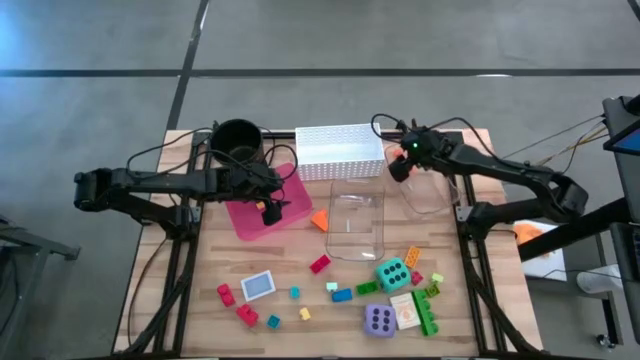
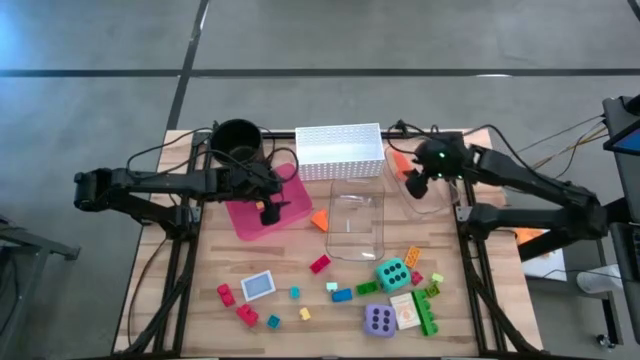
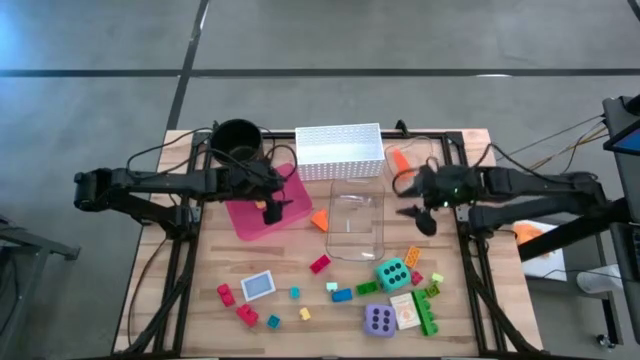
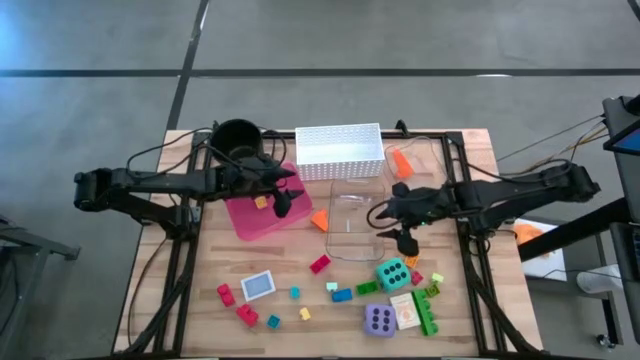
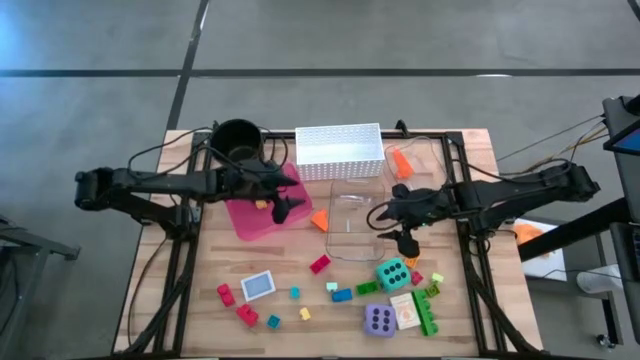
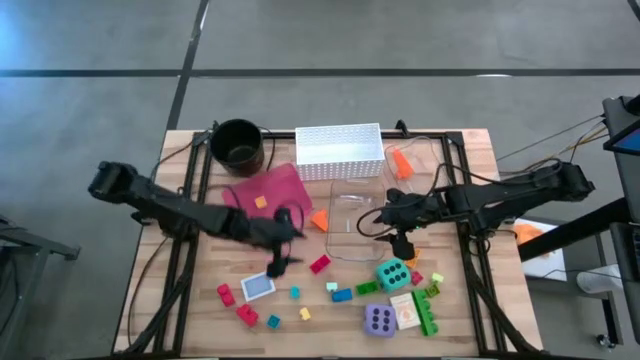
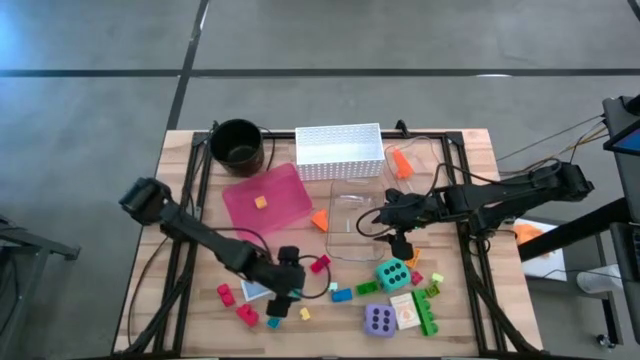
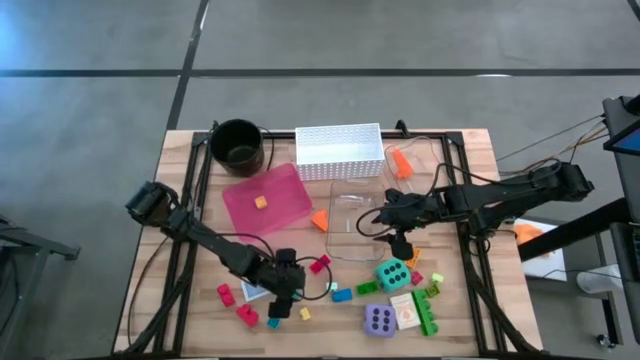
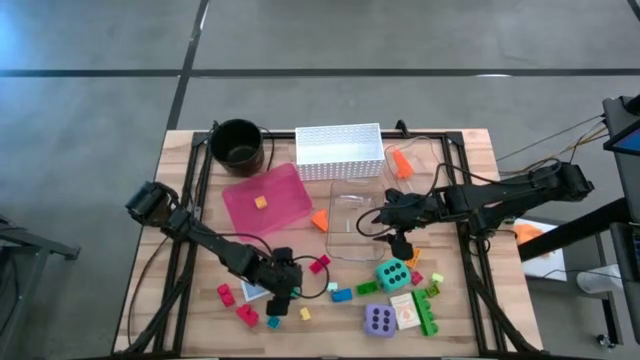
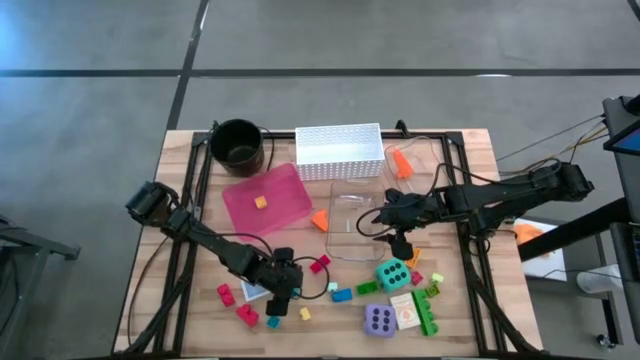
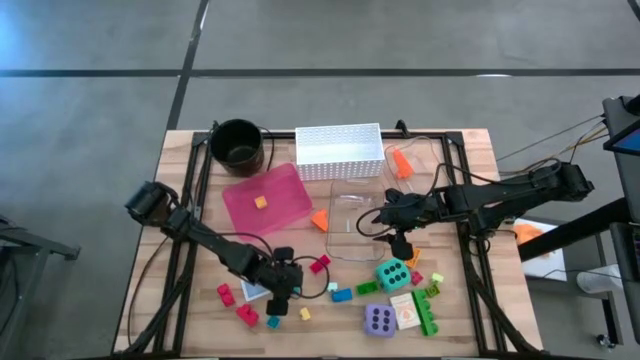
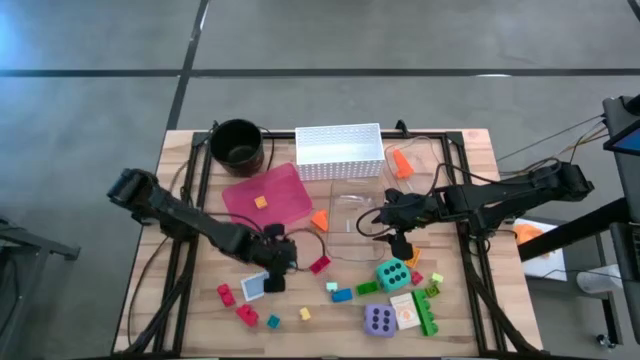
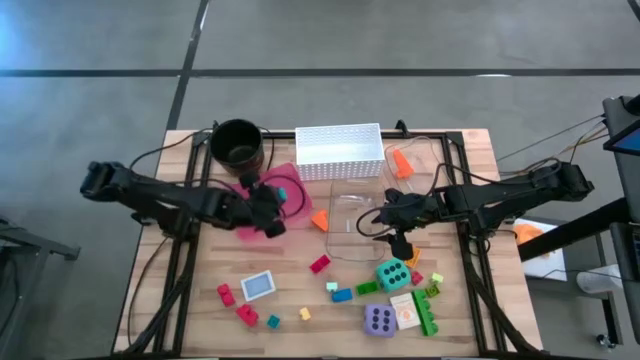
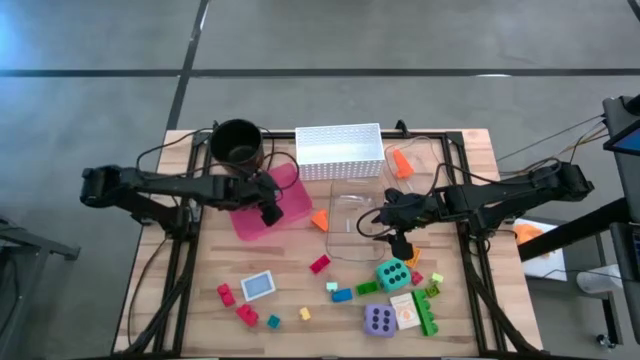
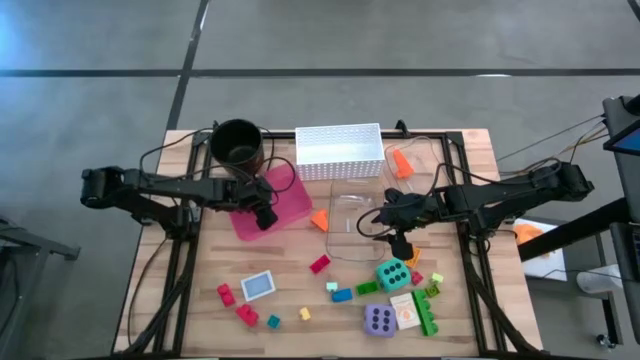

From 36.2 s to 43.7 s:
Task: Pick & Place Toys
Put the top small blue game piece into the red bin

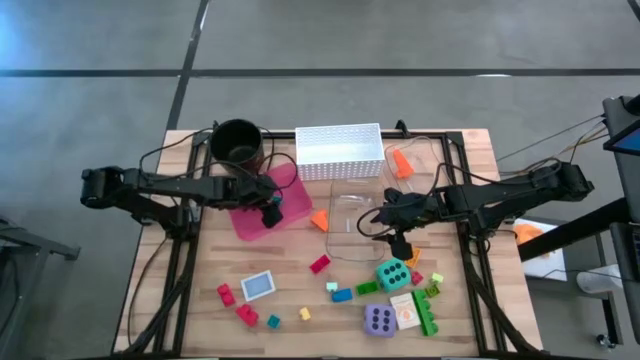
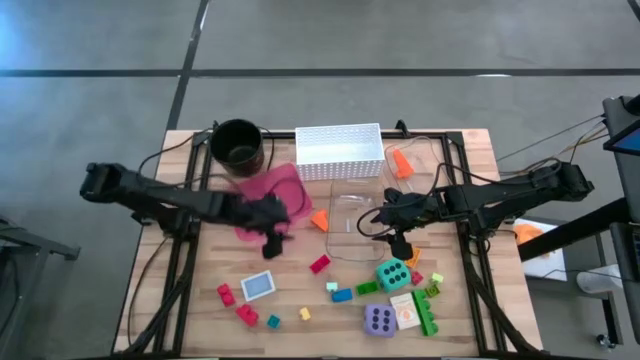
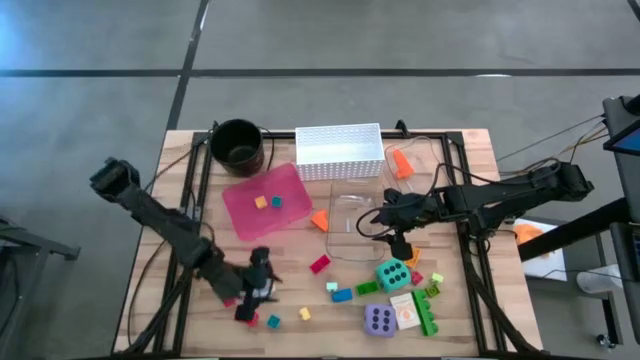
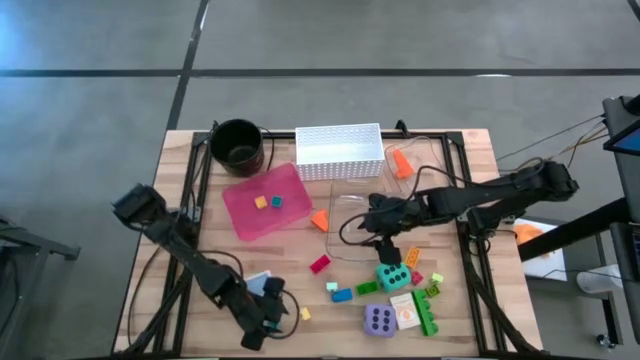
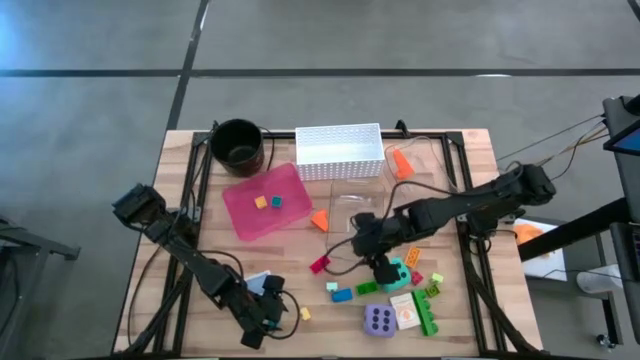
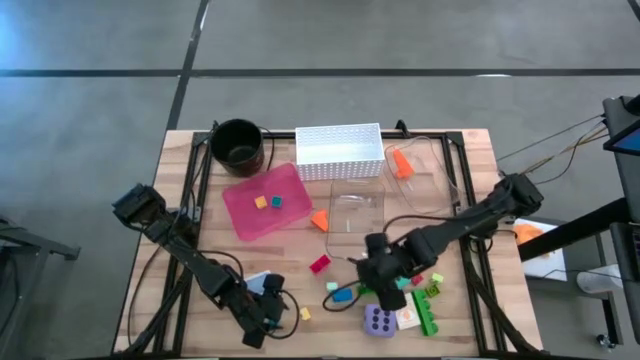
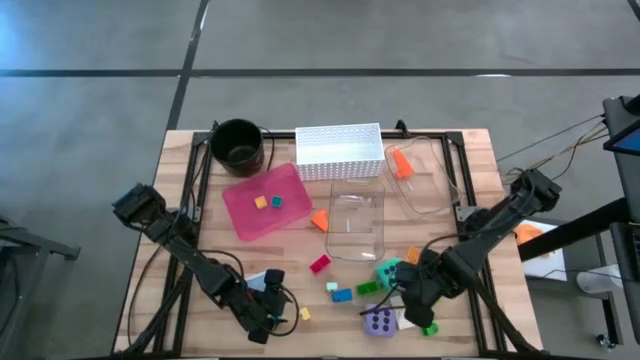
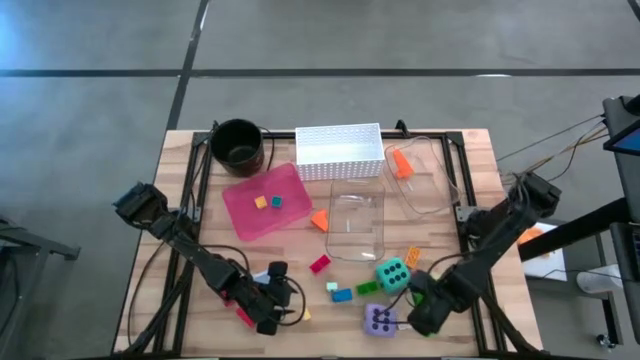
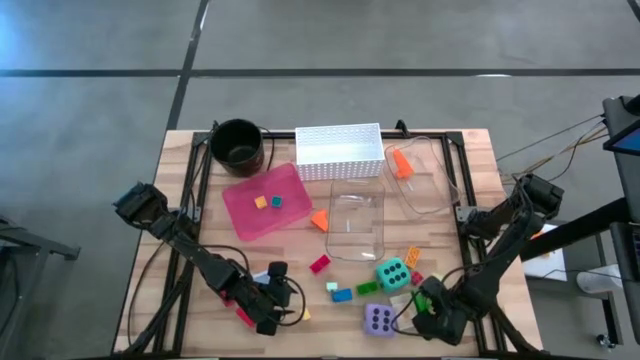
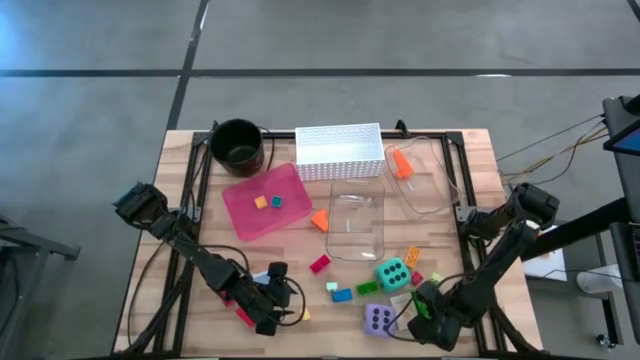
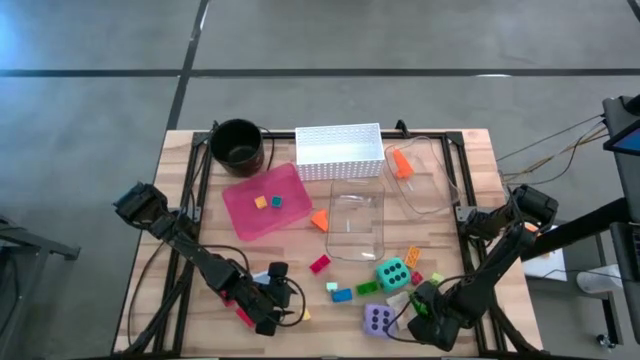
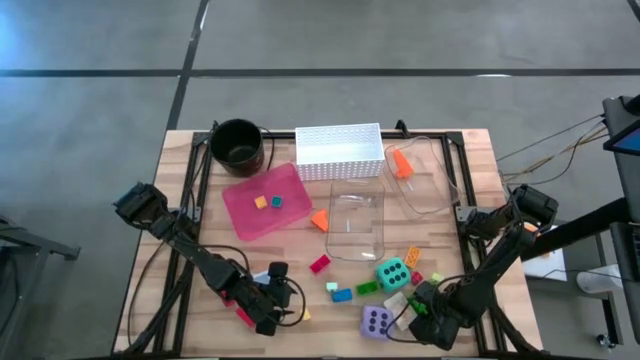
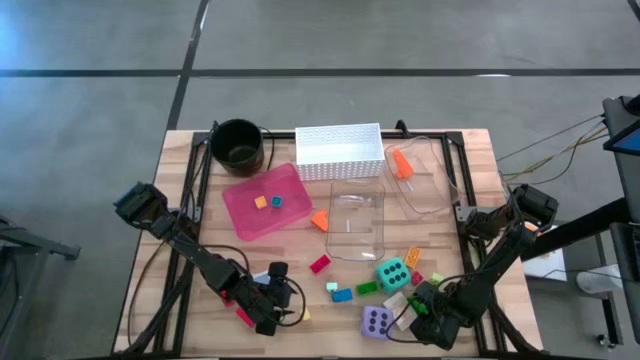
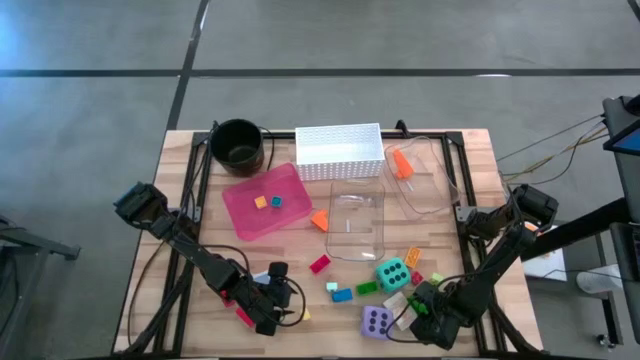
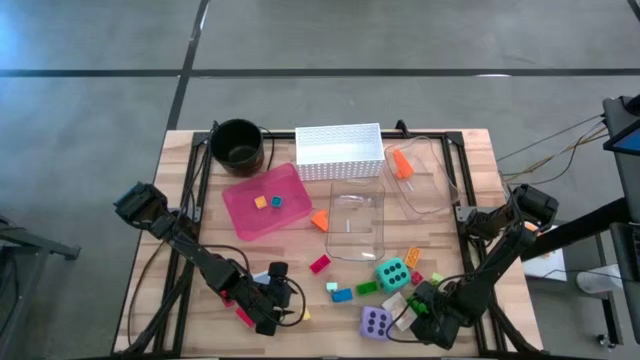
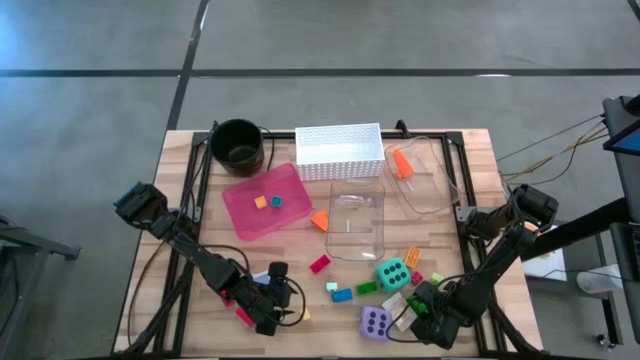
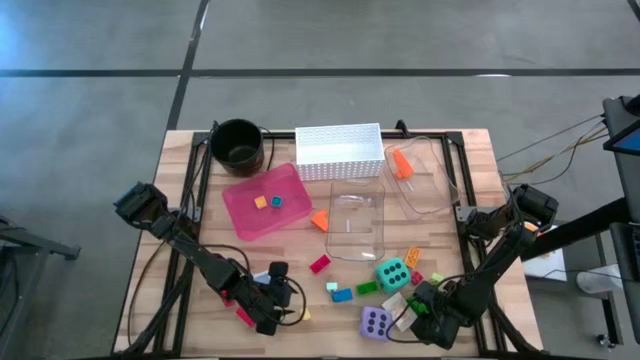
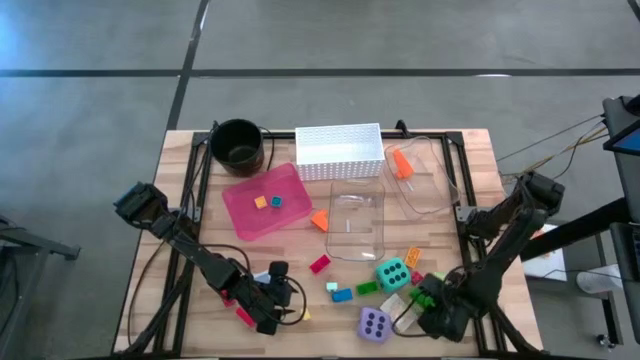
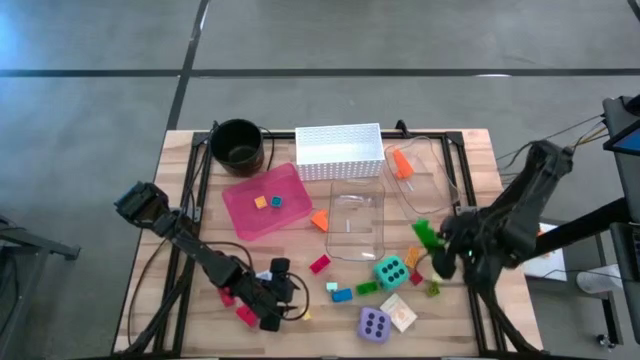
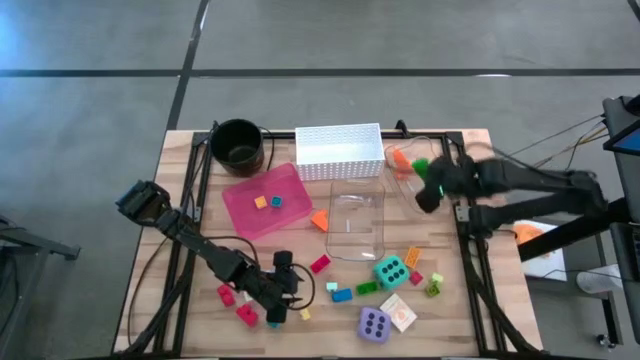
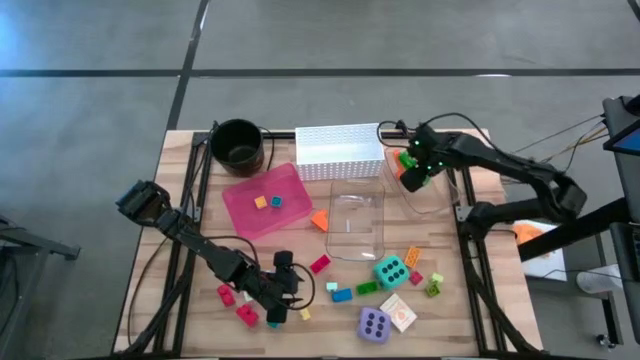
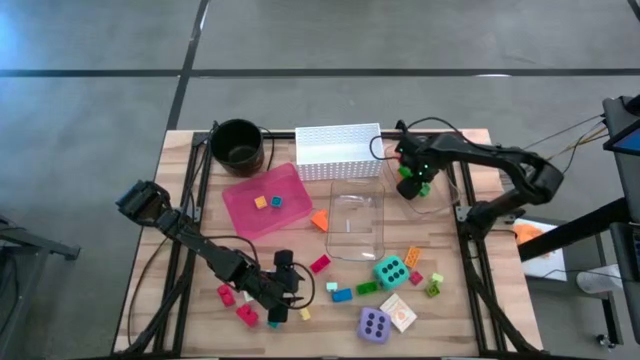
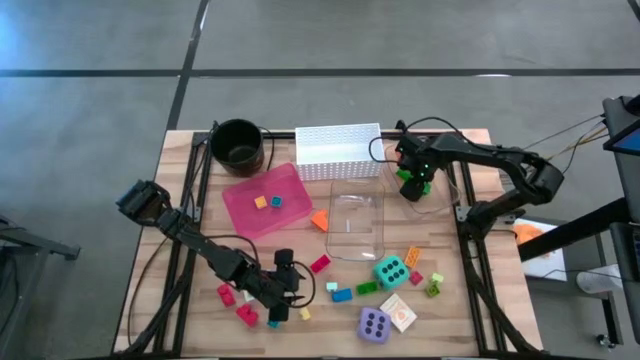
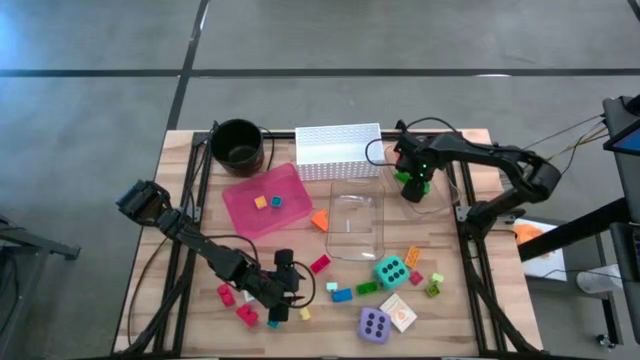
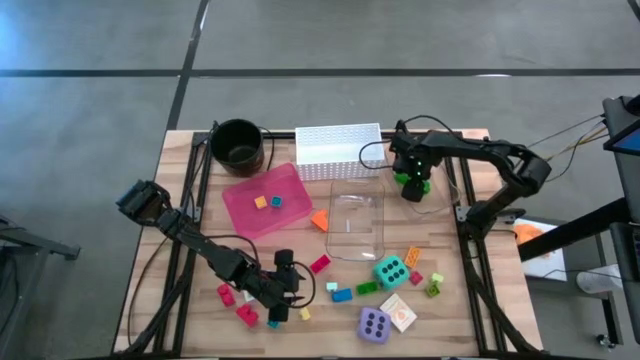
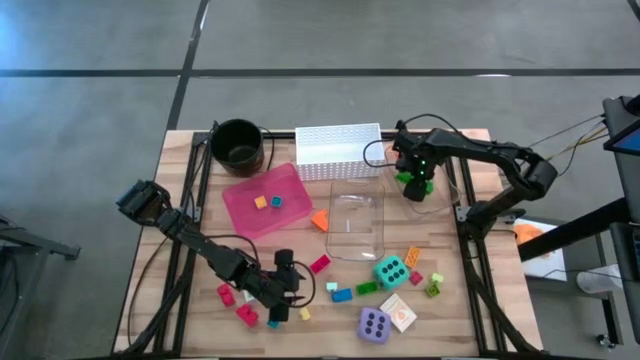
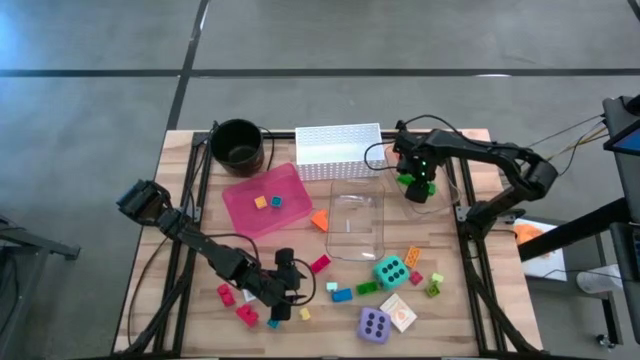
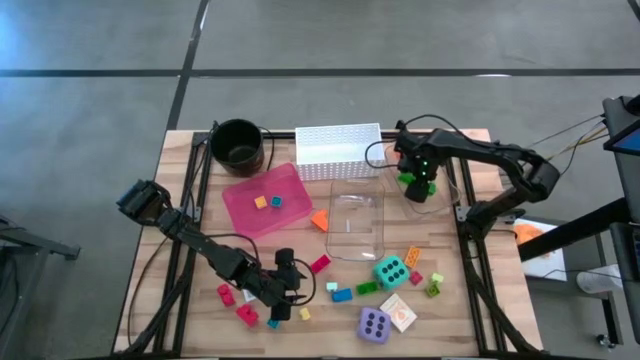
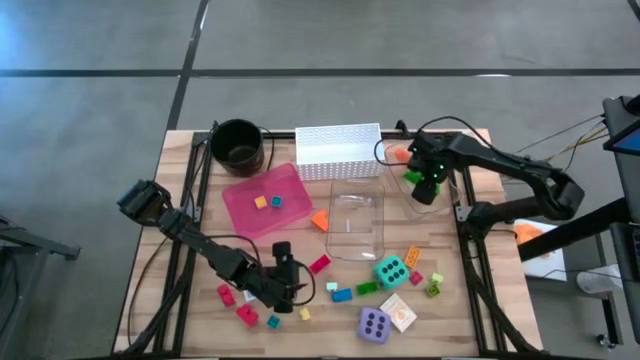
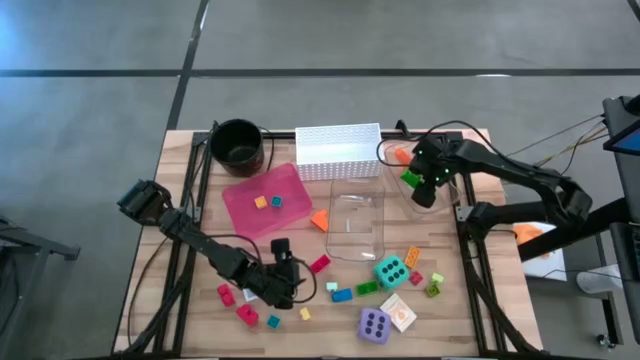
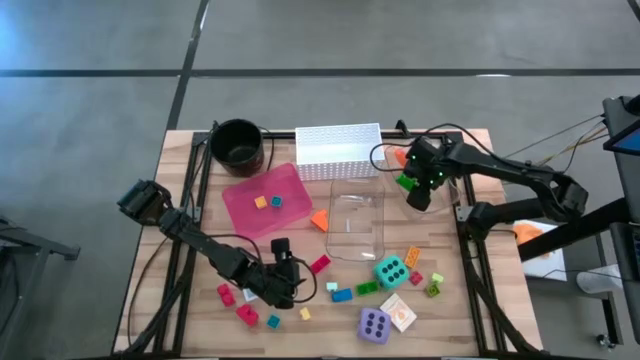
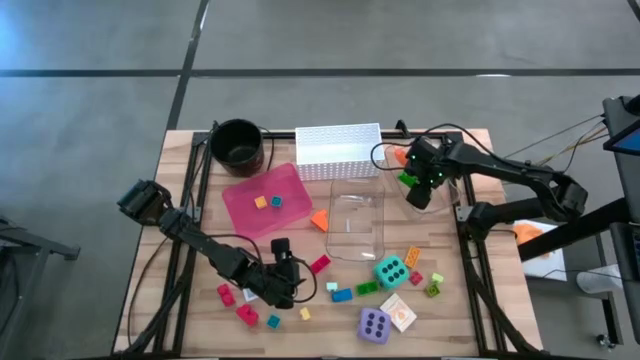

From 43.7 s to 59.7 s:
Put the bottom large green game piece into the top transparent bin
